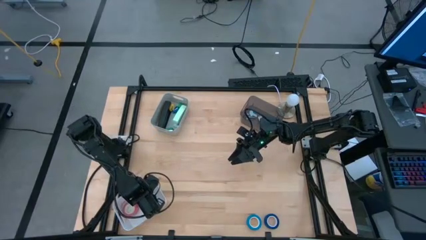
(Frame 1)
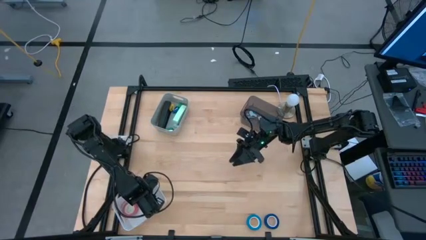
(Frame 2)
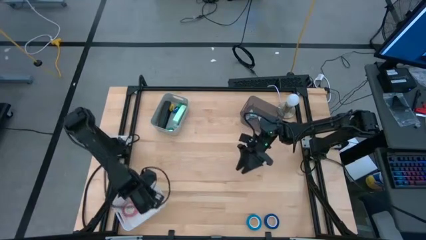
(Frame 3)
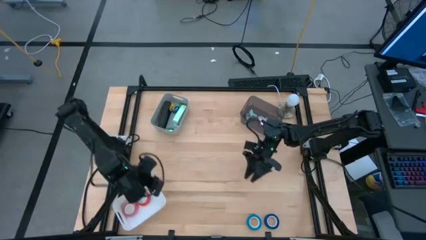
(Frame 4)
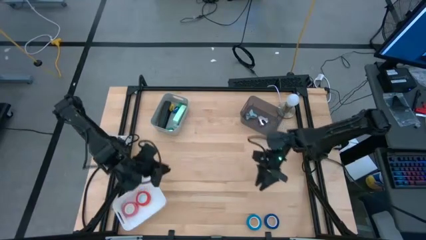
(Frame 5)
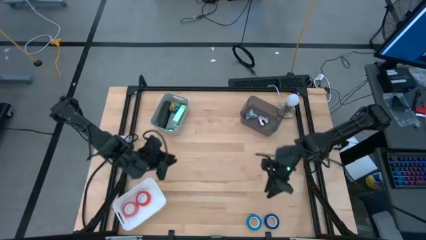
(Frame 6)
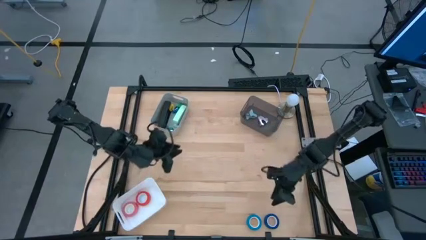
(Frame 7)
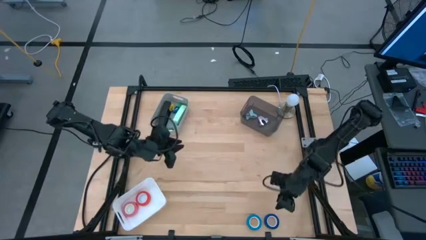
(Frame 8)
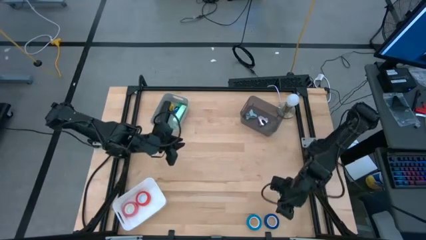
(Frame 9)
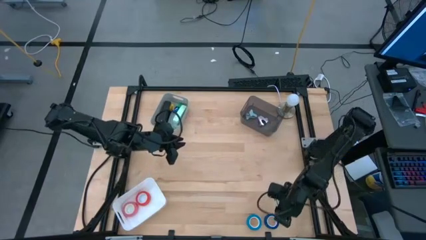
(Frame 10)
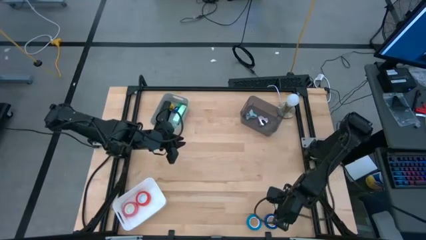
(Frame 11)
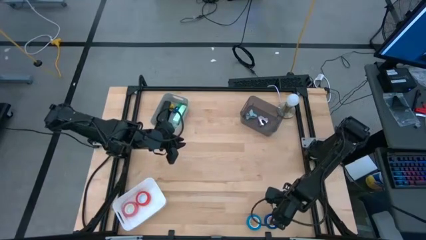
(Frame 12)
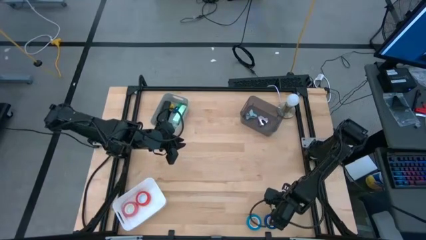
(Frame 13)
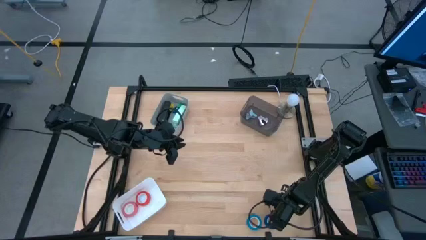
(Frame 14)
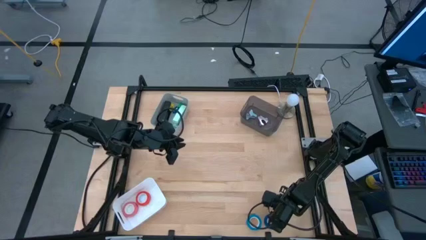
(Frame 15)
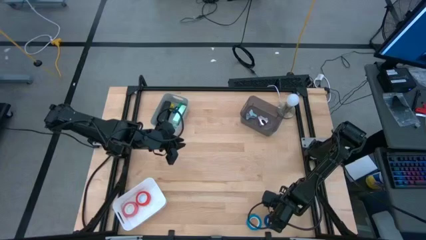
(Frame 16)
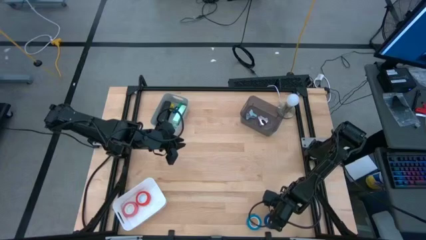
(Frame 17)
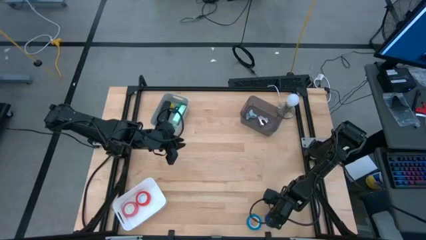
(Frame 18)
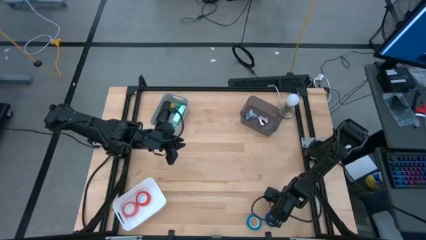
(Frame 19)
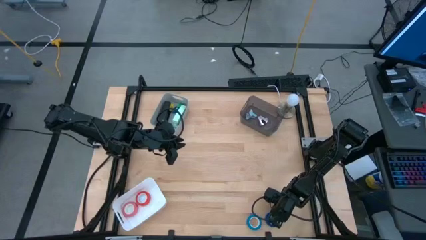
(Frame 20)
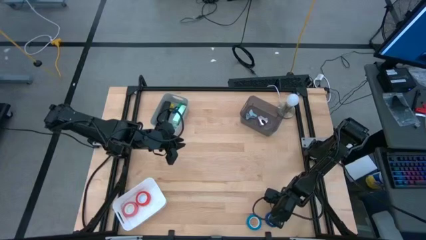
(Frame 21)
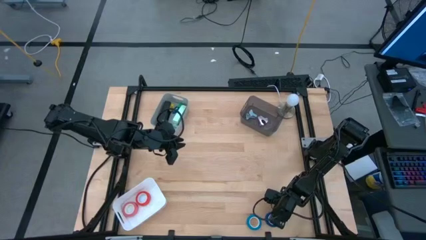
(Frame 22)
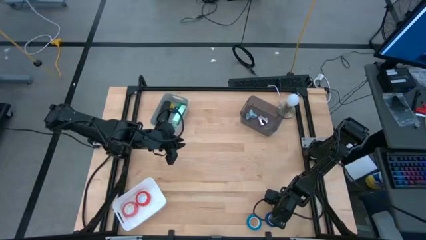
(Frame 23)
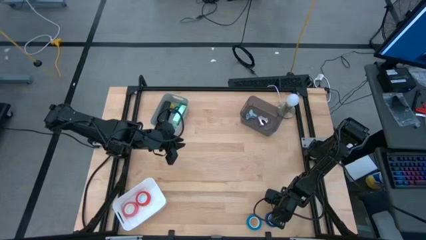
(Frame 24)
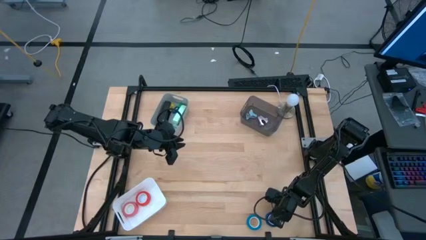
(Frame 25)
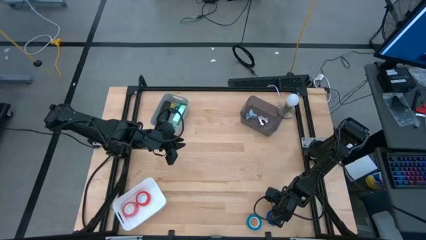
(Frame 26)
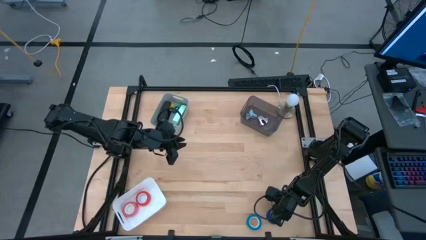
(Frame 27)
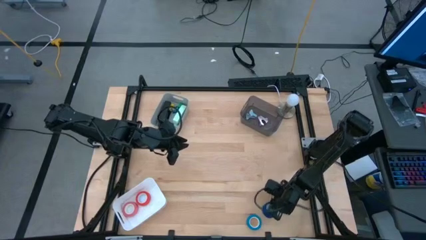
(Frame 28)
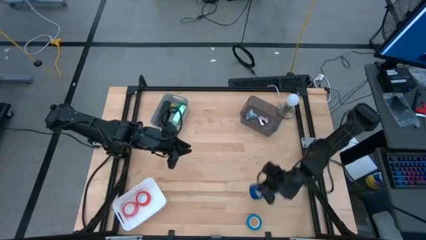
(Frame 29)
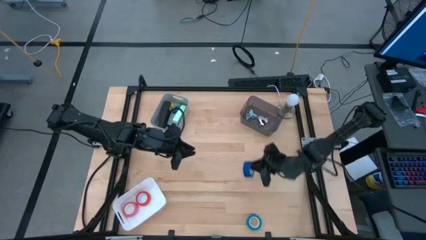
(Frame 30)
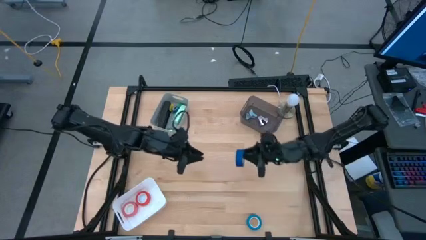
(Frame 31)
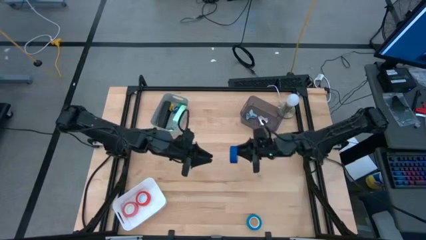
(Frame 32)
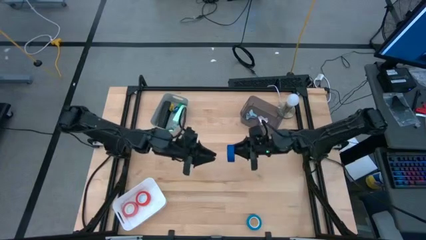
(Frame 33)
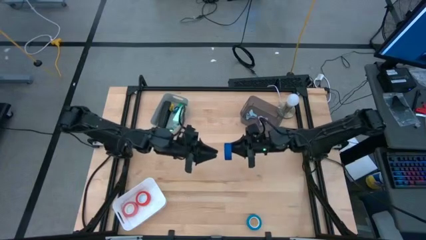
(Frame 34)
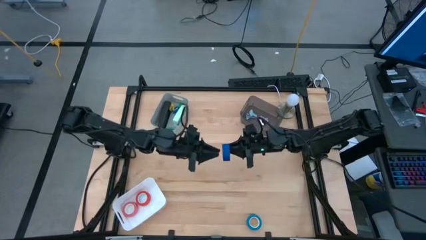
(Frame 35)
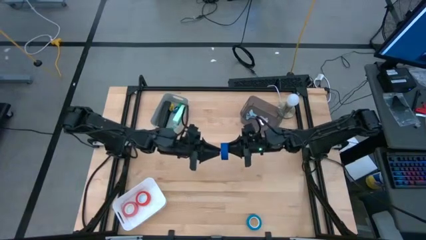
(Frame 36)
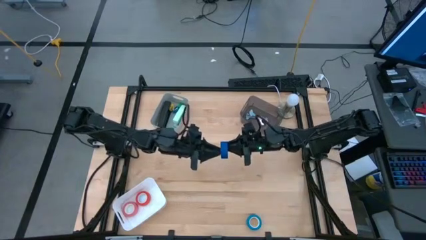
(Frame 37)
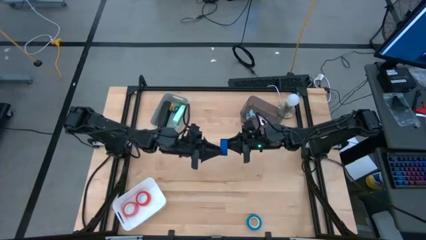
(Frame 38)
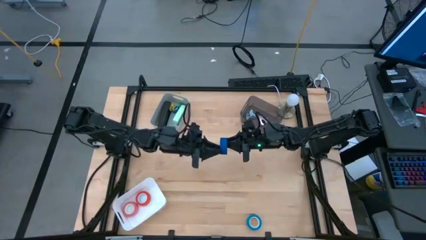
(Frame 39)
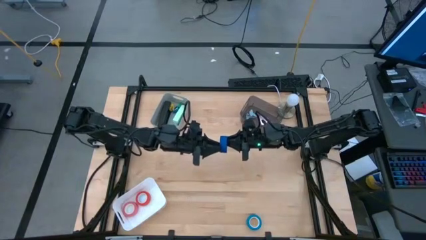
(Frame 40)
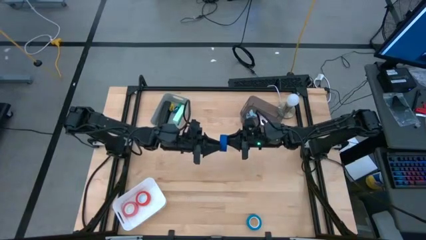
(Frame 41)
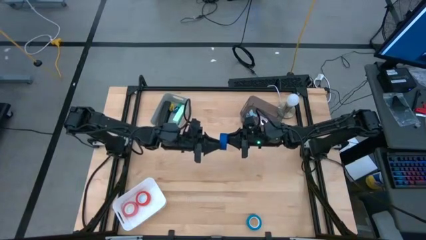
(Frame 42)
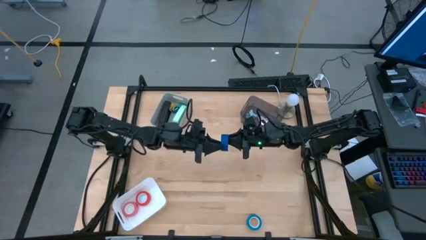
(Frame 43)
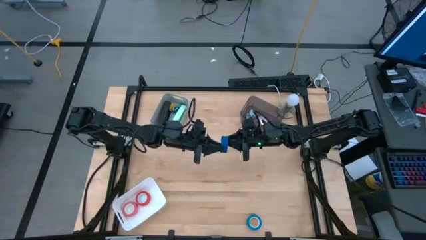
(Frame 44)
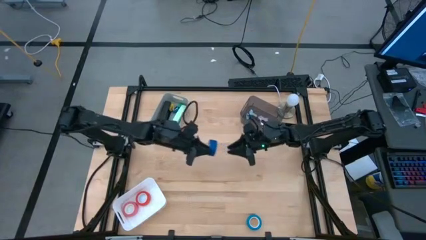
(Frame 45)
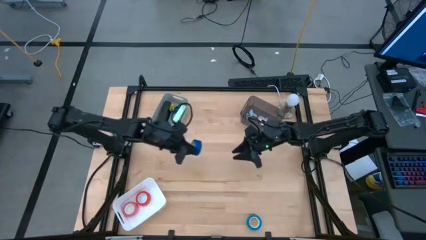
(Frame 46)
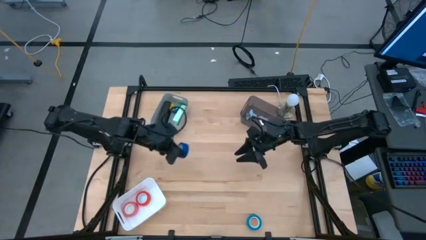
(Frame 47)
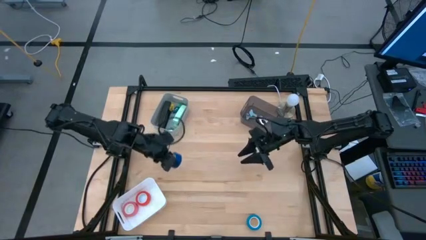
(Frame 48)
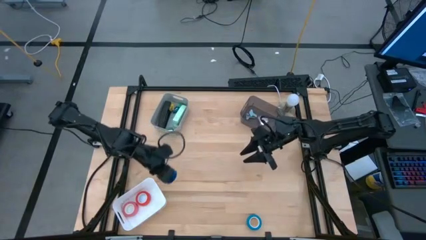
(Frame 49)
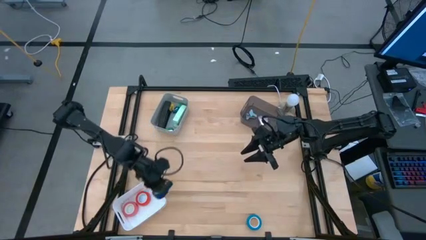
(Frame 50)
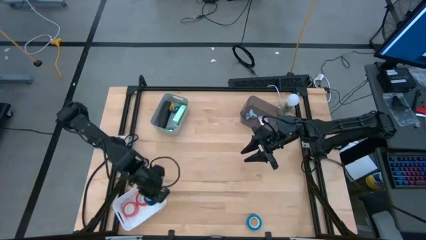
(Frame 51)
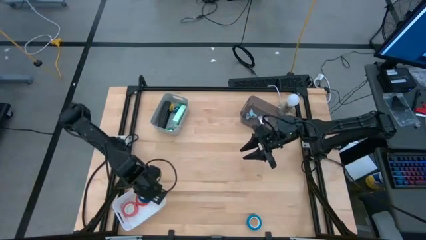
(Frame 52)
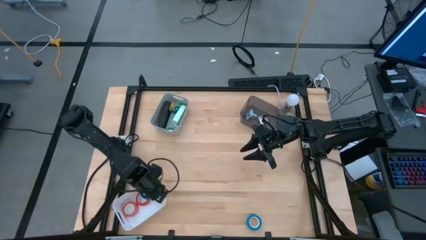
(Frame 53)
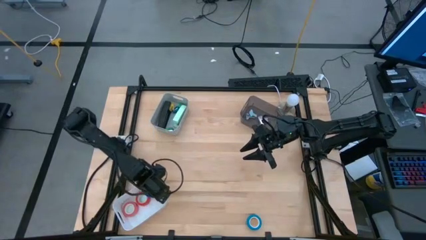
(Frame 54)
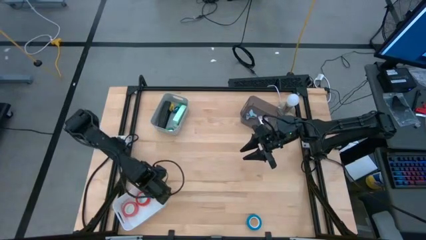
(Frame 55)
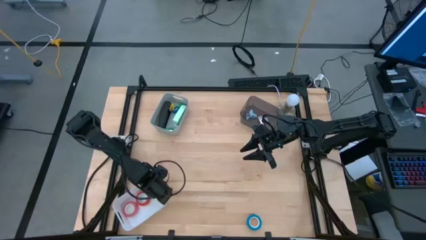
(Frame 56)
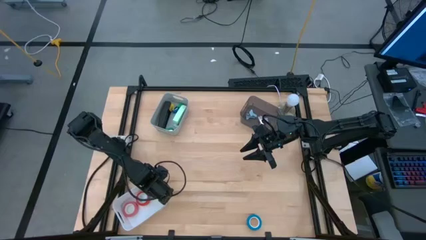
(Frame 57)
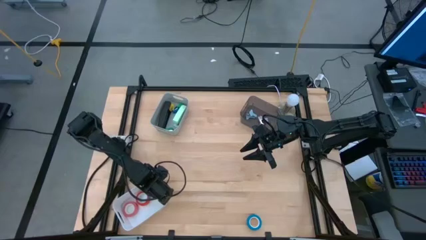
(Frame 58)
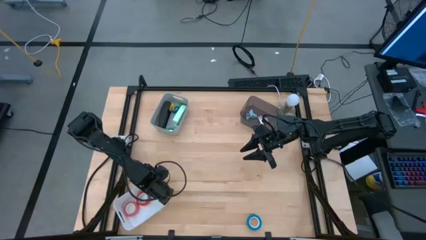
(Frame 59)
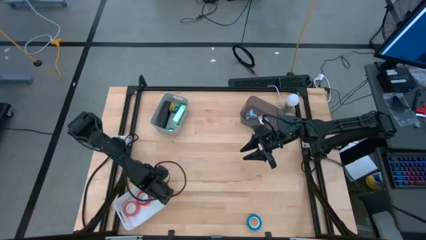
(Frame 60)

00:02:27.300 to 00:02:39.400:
Task: Pick and place Stapler, Stapler remover, tape
Put the dark blue tape into the white bin
